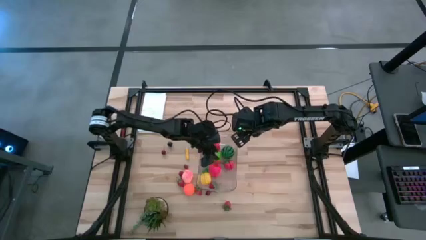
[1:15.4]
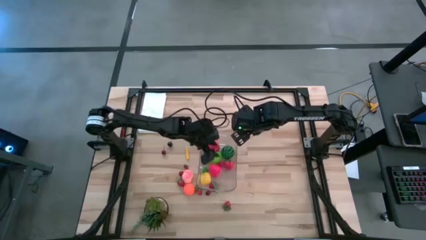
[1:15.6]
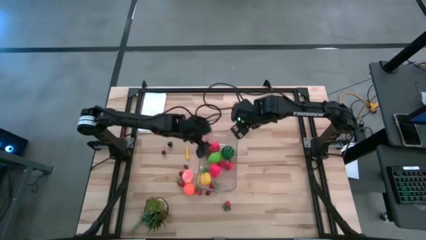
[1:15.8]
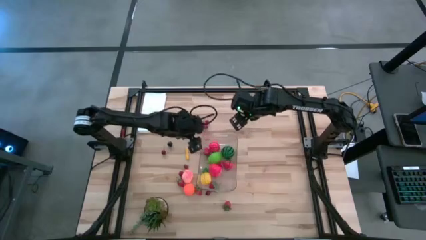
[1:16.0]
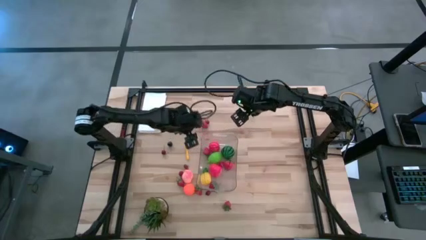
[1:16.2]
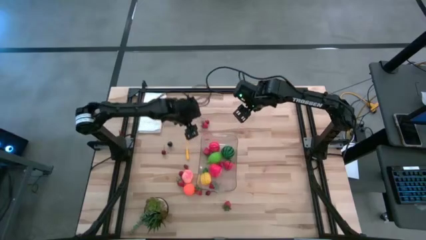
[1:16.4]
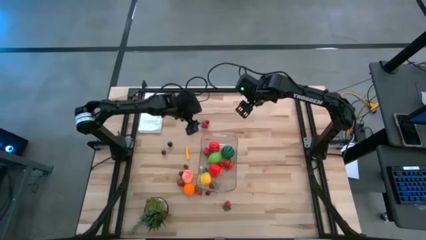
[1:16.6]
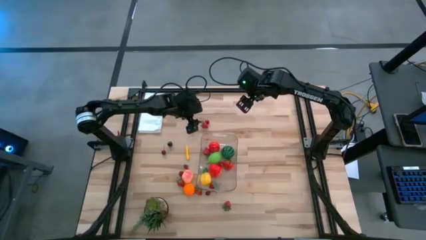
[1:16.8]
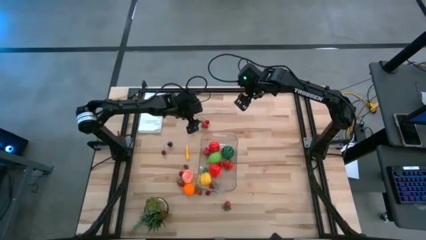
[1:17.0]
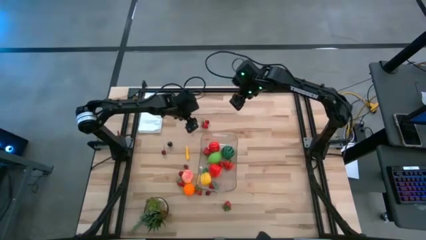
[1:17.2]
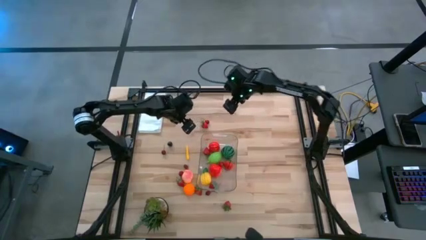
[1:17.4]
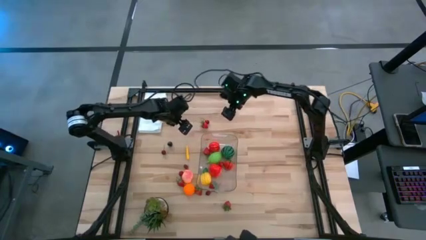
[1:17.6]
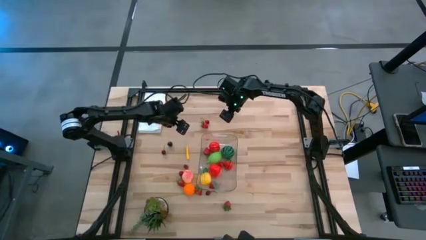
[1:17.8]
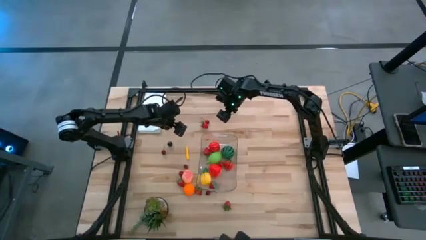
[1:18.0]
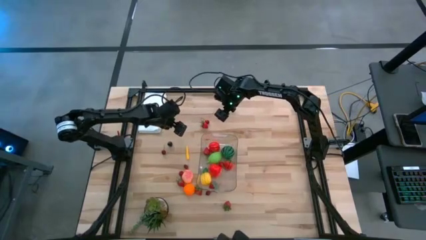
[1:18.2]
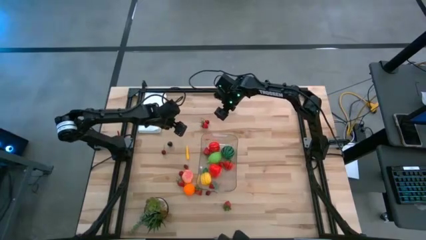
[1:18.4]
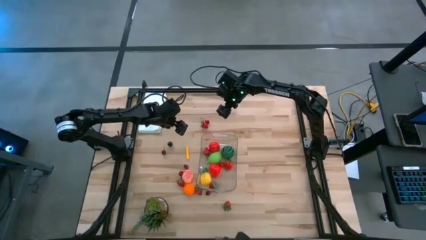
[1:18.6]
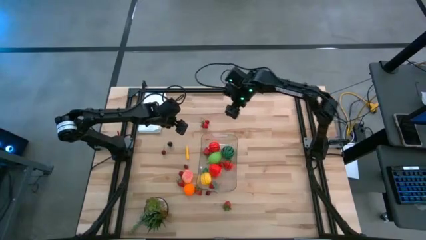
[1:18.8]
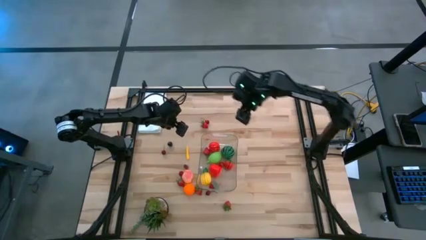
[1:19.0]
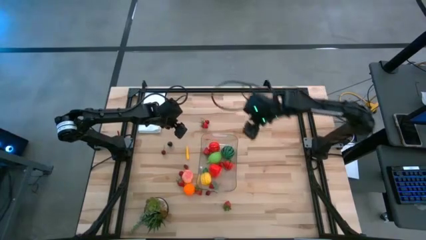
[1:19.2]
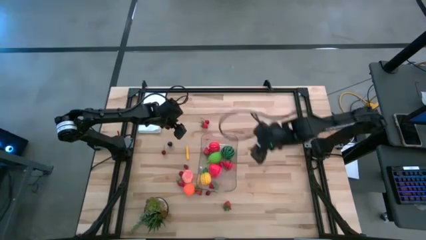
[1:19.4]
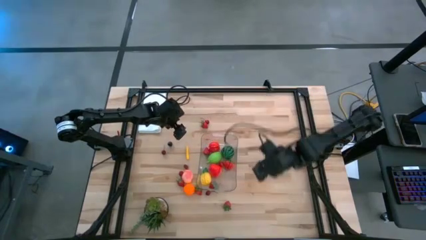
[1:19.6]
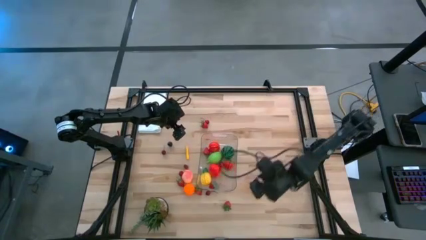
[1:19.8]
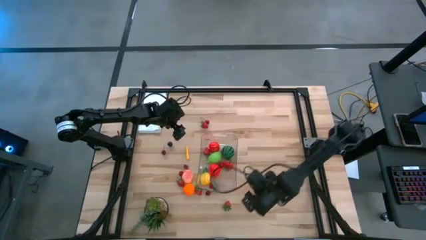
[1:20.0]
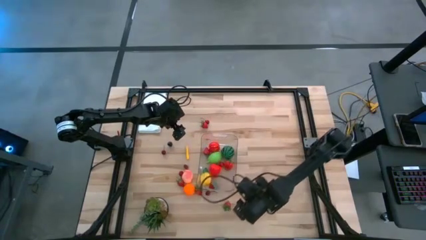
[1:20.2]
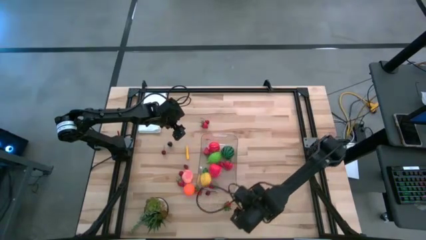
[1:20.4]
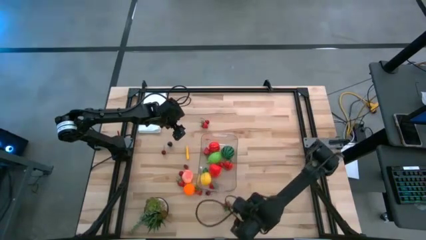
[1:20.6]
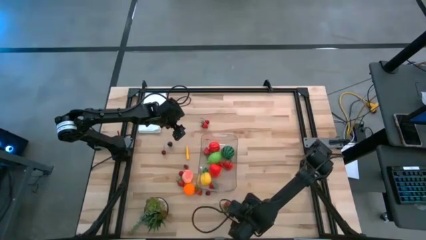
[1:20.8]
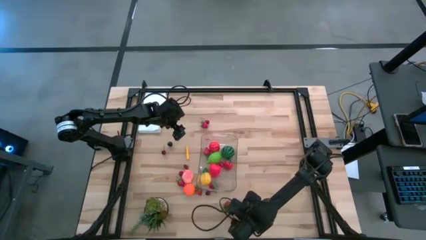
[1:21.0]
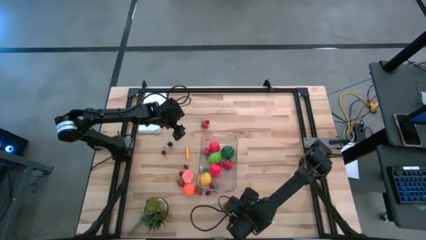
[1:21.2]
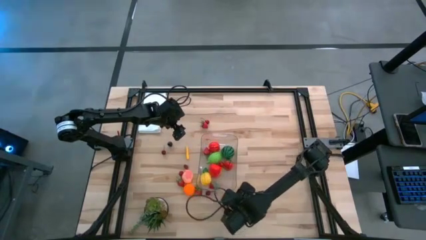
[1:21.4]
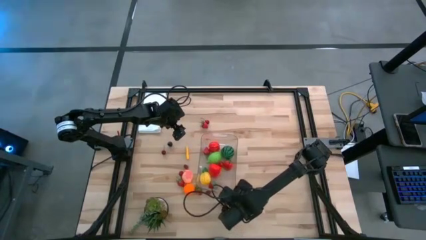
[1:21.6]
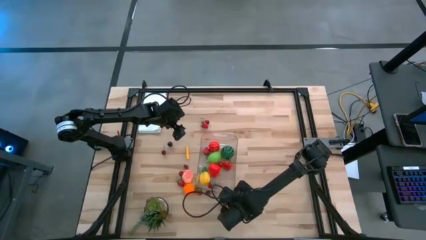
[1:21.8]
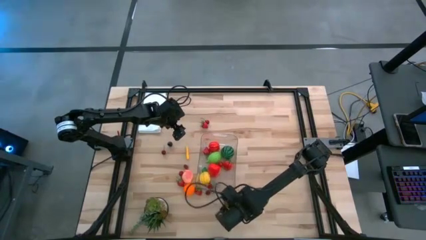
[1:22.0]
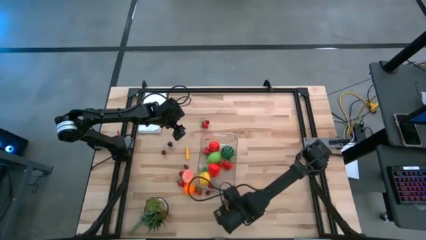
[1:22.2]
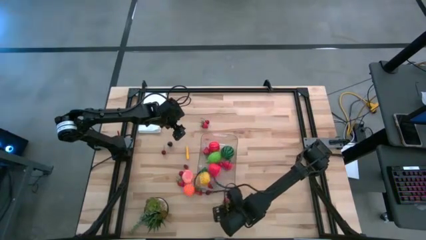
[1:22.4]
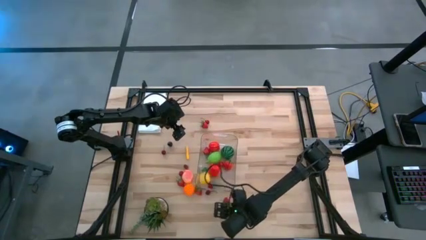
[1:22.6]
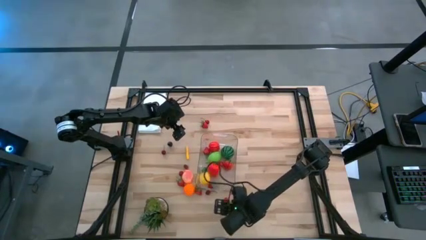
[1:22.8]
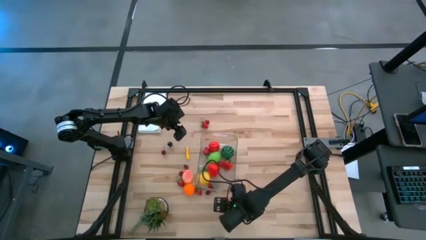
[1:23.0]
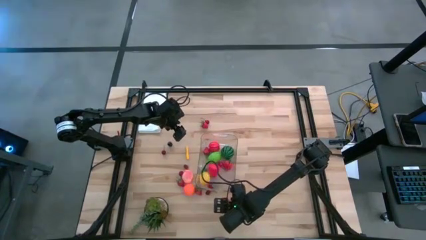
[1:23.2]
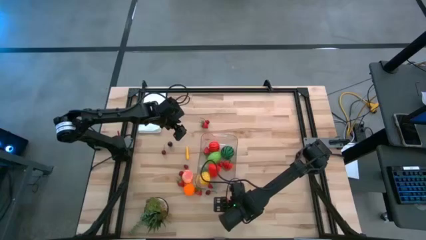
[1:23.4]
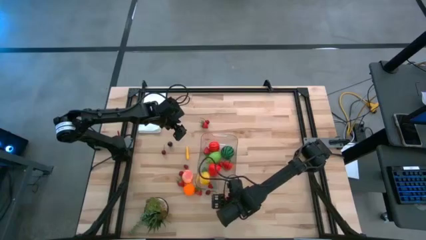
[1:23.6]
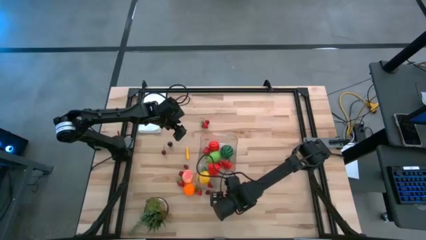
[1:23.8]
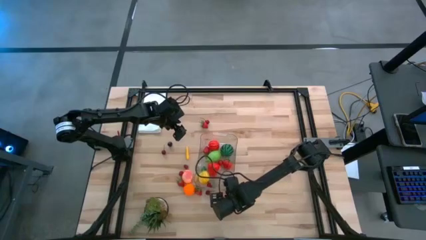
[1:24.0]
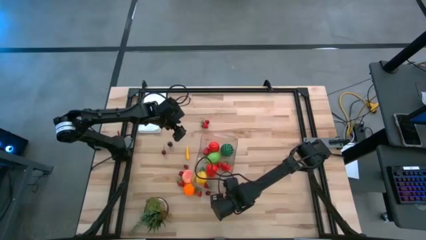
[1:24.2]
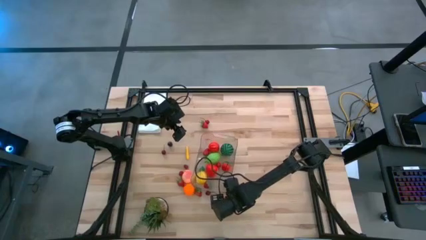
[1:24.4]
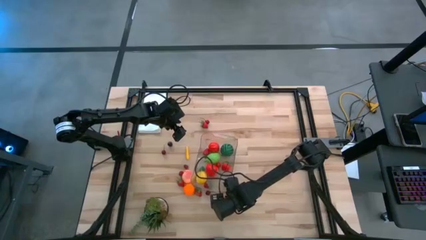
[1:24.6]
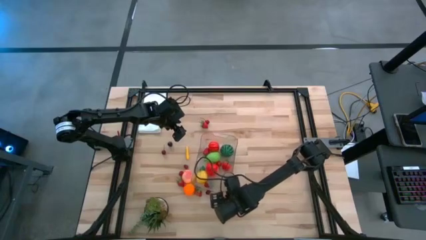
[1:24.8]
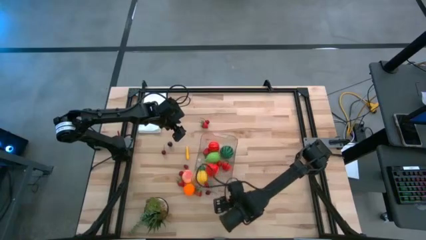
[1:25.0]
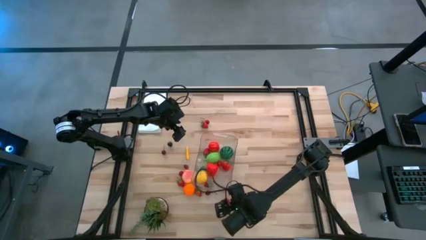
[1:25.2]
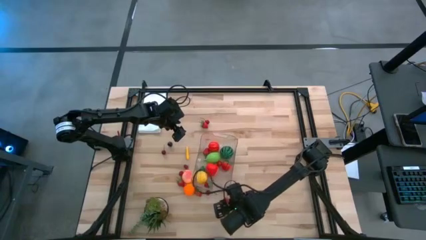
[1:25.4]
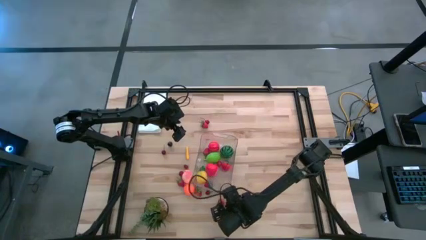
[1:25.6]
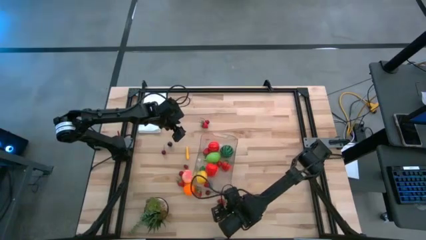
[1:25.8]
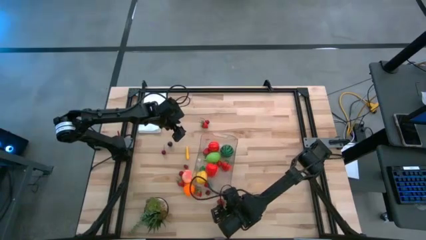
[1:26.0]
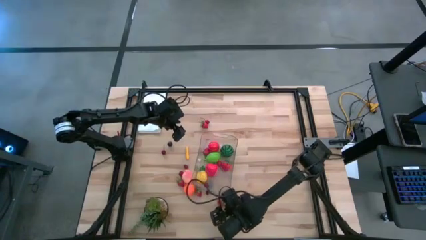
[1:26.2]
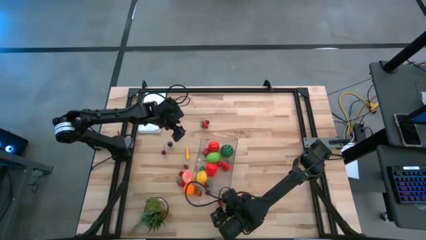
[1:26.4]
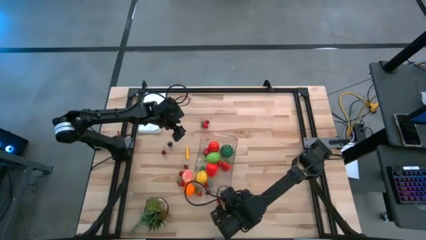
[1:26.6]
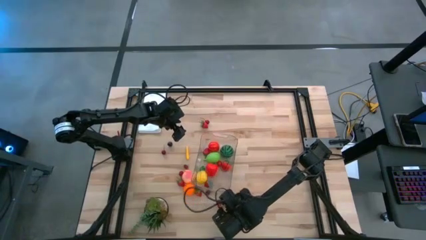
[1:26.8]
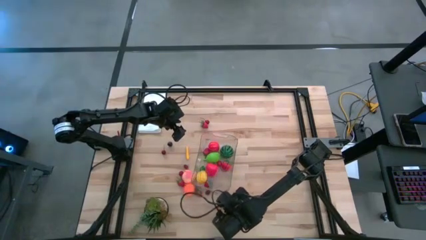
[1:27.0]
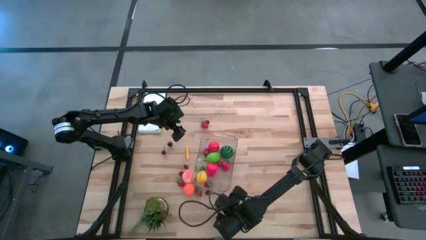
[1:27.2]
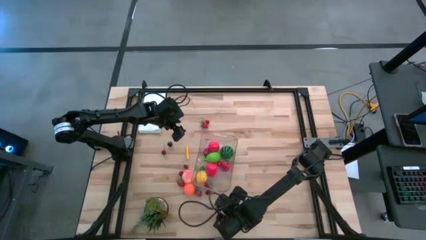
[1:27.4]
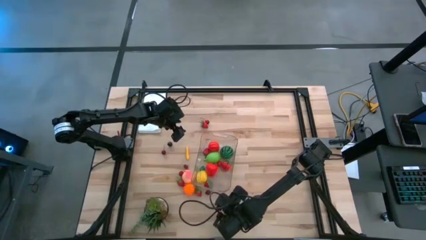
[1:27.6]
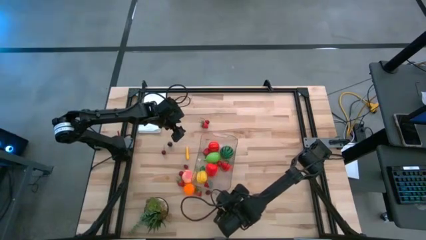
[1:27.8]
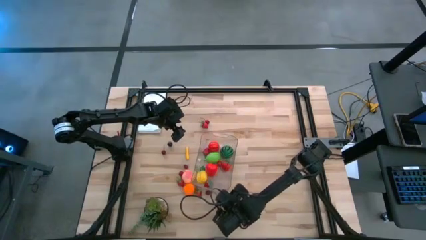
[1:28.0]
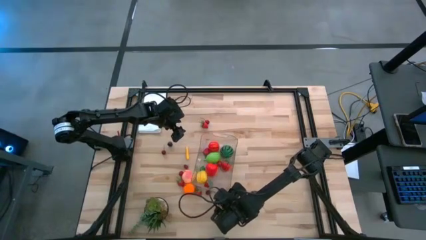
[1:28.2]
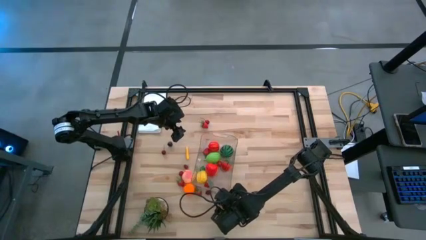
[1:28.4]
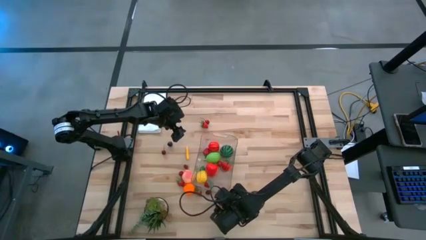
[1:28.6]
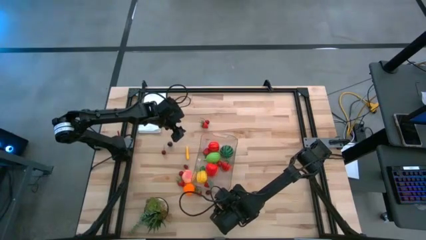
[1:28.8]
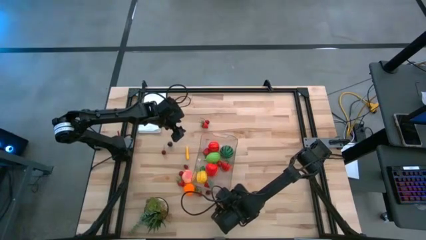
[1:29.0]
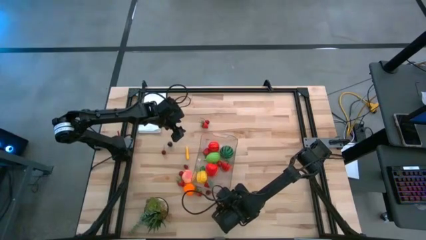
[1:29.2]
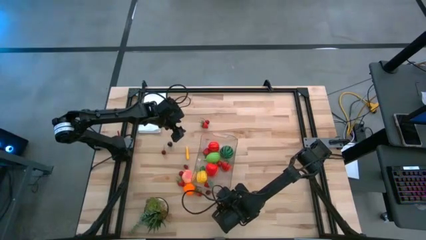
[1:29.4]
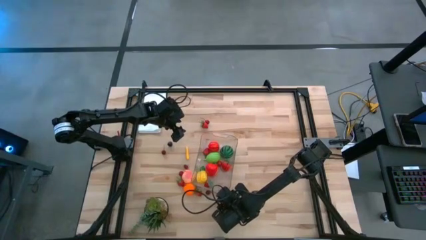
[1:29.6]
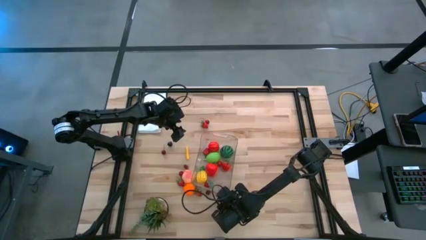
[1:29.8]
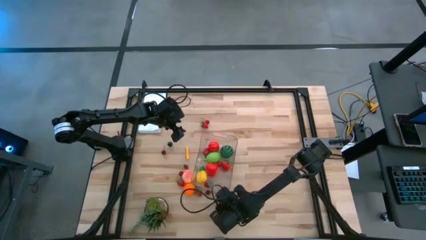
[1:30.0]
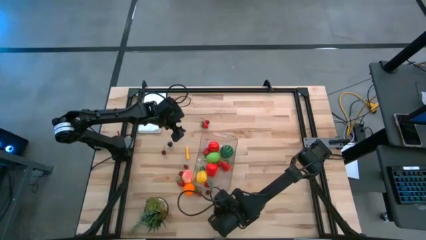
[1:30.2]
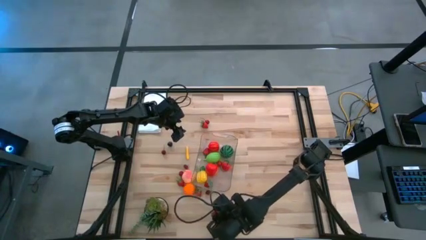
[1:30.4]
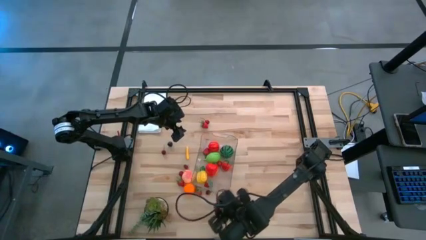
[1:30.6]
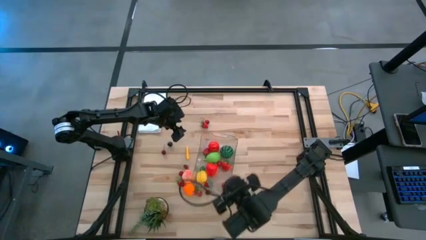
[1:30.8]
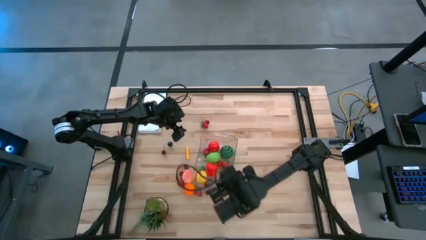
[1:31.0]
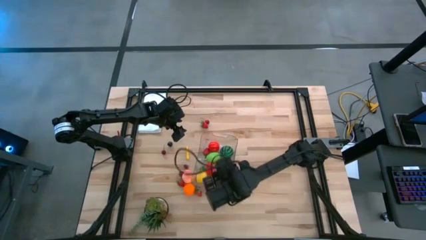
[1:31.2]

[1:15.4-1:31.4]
Task: Pick and placing Produce into tupperware
Put the strawberry into the transparent bin
